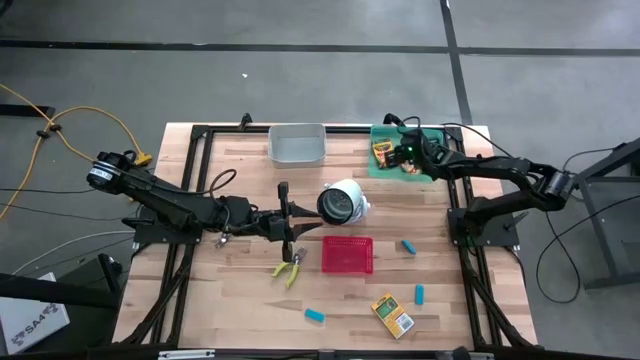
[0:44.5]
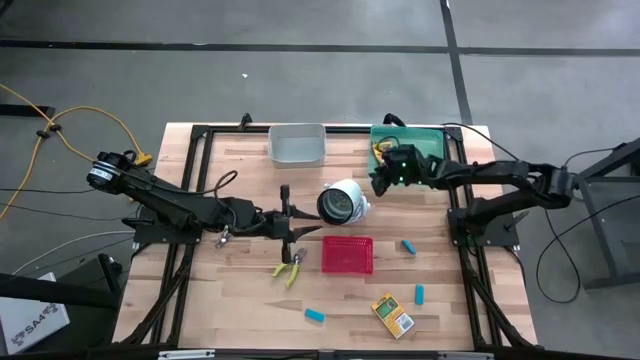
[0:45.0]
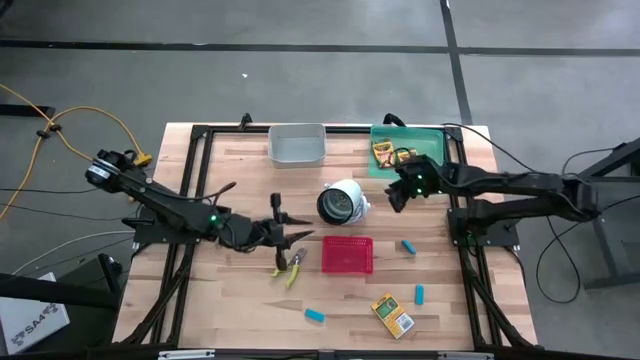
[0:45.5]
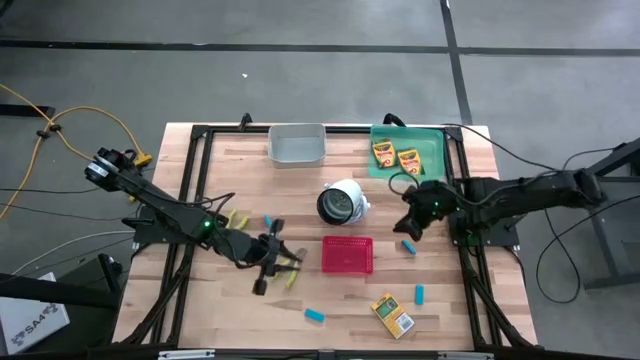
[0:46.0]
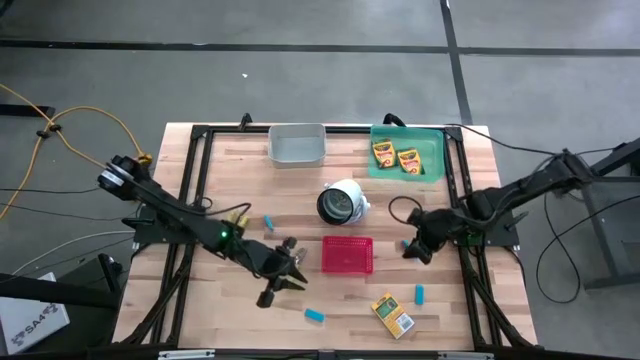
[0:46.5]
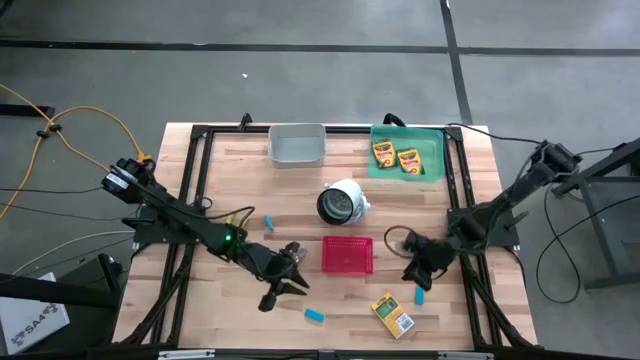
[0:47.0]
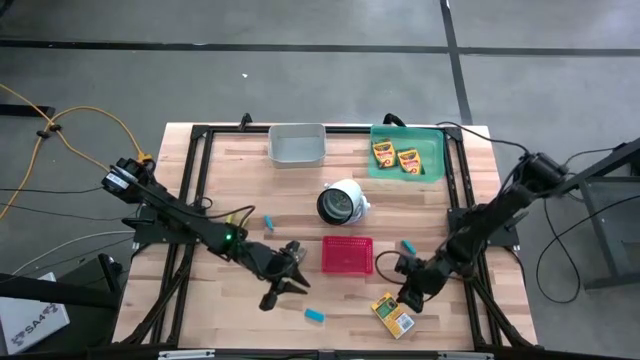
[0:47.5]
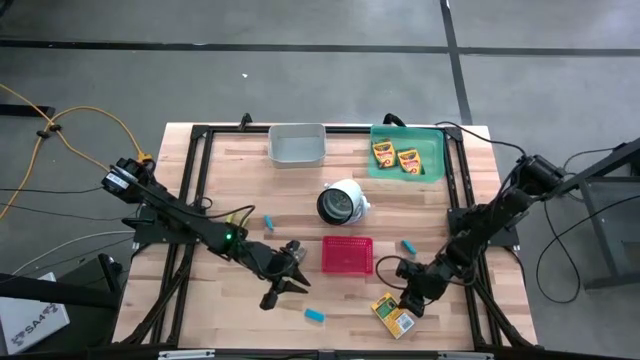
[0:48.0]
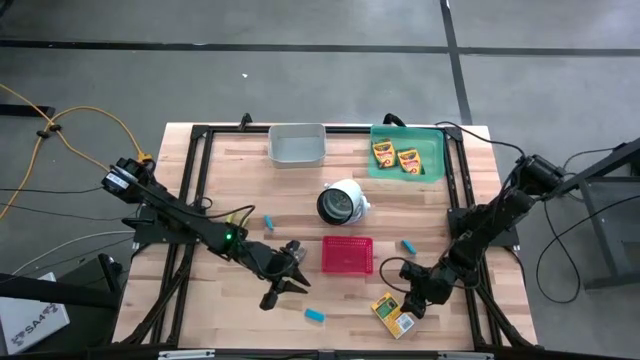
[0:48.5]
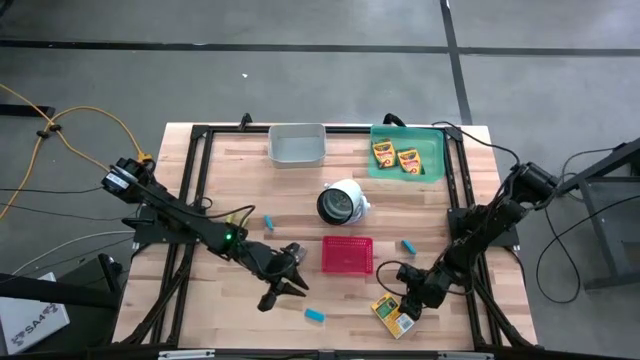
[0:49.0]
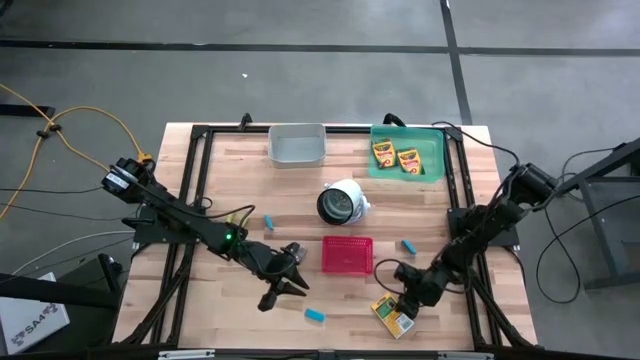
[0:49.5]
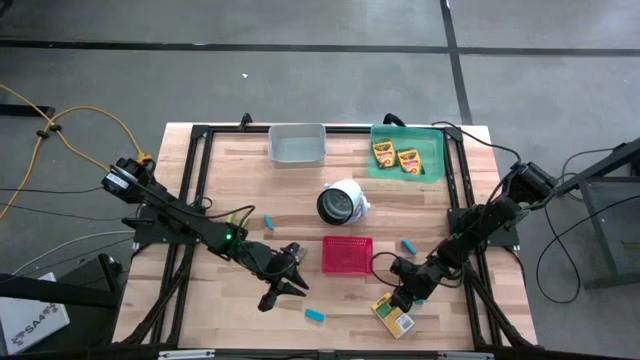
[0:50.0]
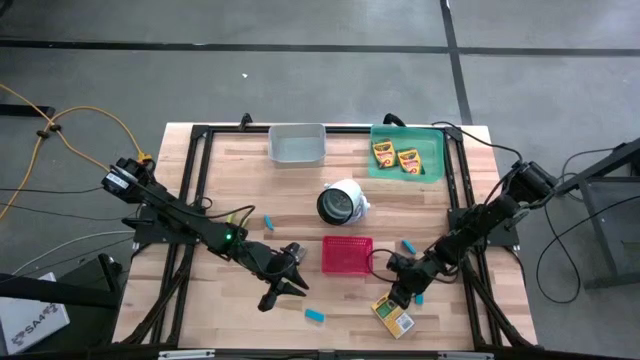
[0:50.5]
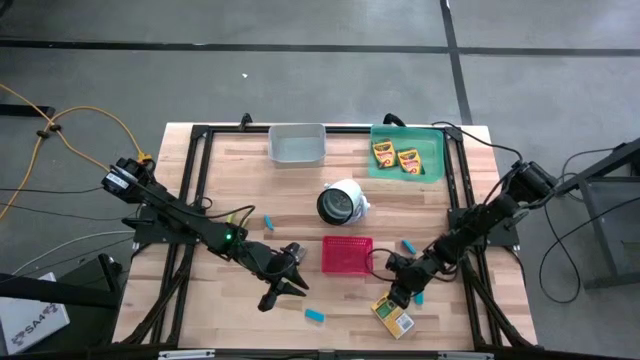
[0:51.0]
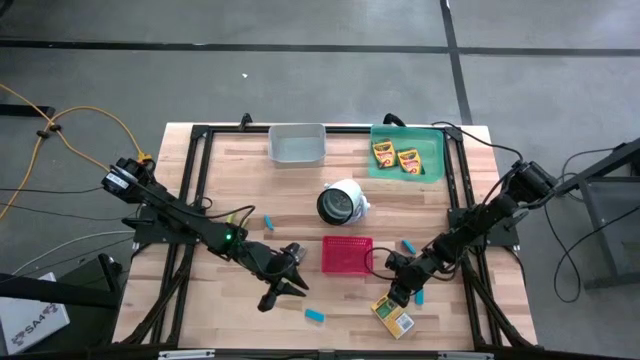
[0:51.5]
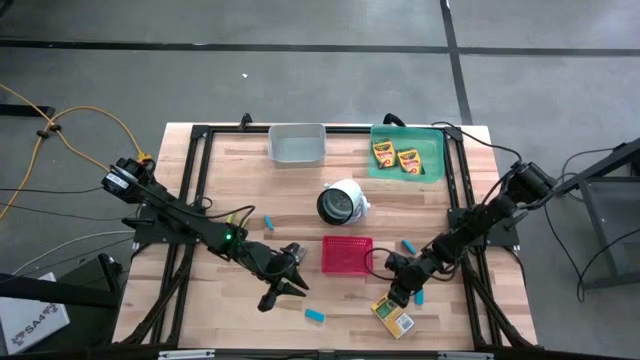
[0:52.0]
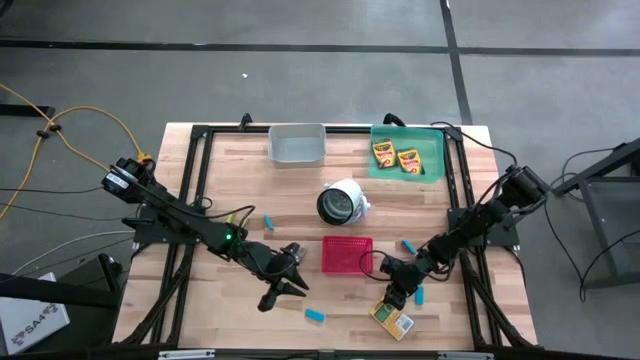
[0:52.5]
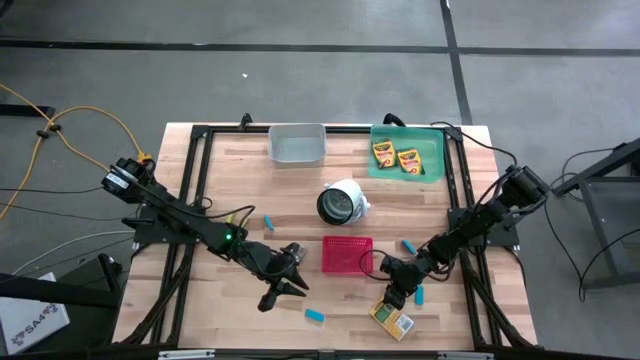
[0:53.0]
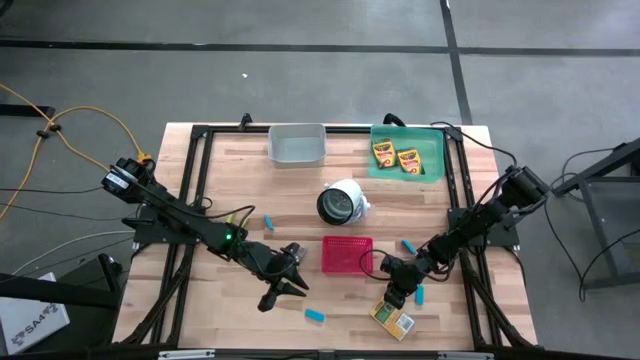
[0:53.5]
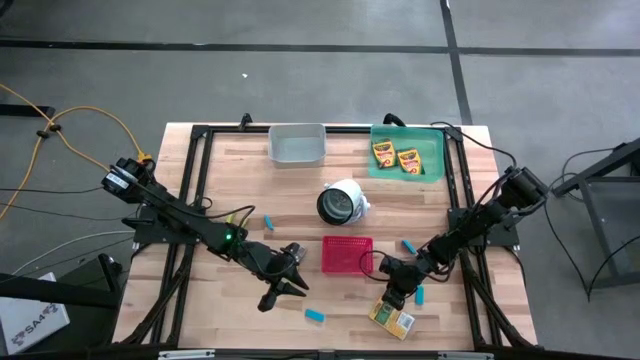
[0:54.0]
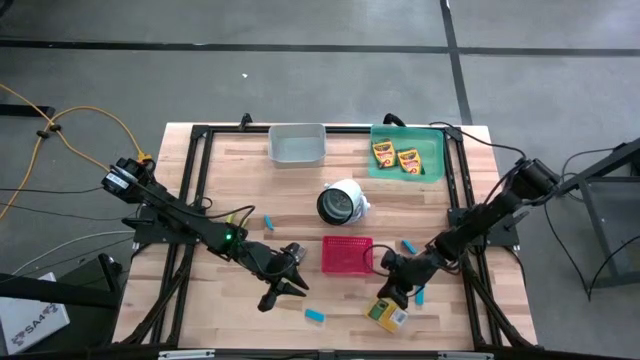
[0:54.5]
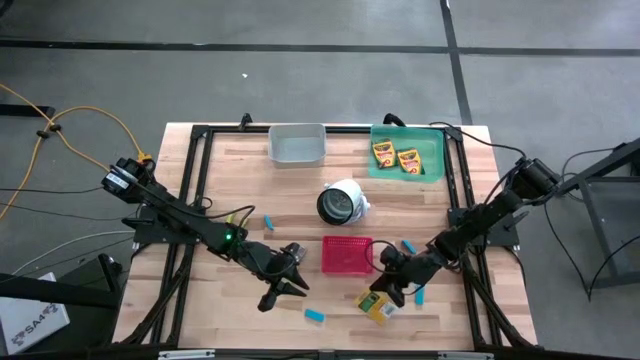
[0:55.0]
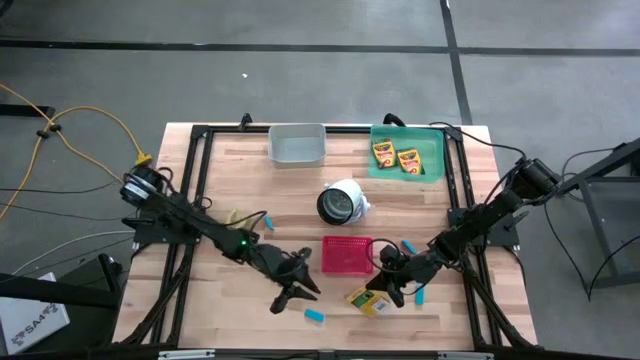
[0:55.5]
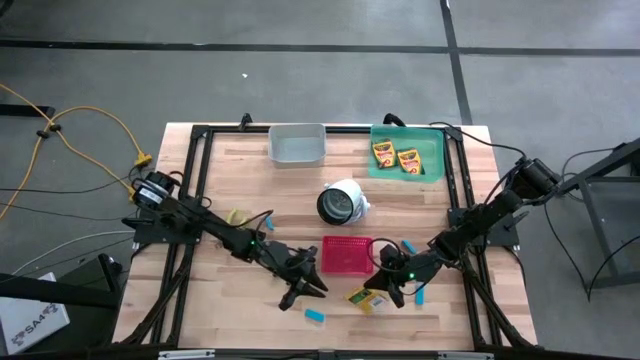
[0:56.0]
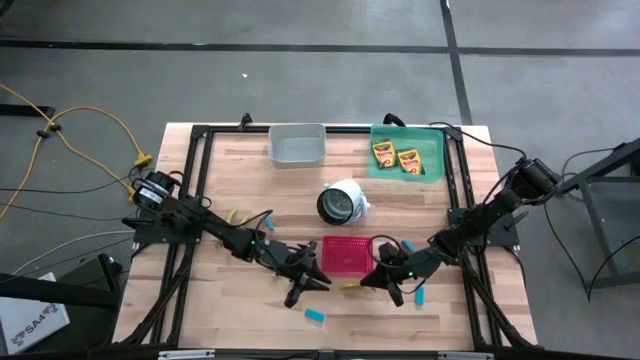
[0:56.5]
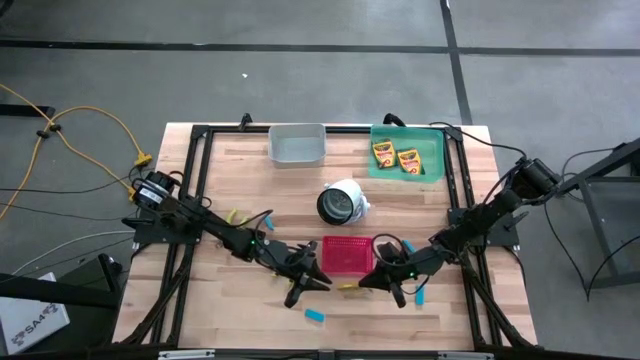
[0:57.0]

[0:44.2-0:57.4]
Task: Pick & Place School Supplies
Put the yellow crayon box into the green bin
